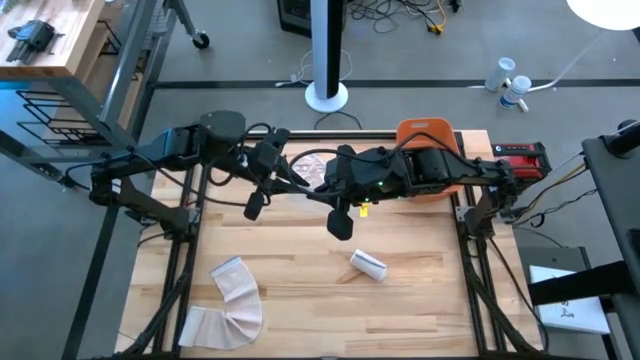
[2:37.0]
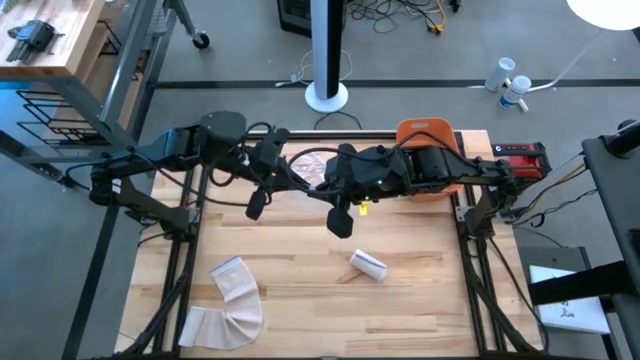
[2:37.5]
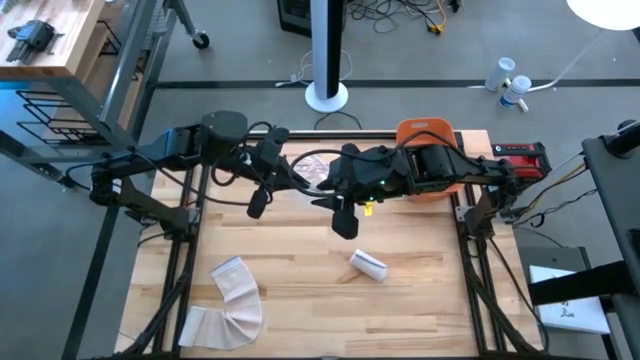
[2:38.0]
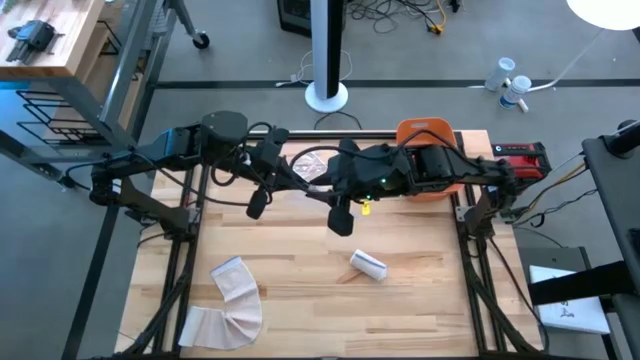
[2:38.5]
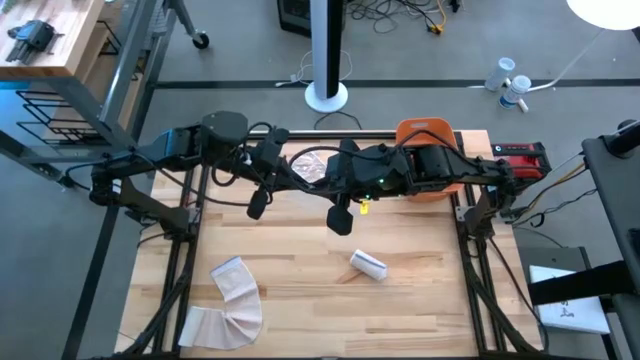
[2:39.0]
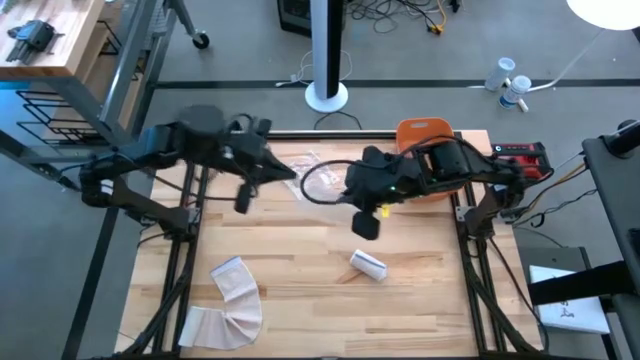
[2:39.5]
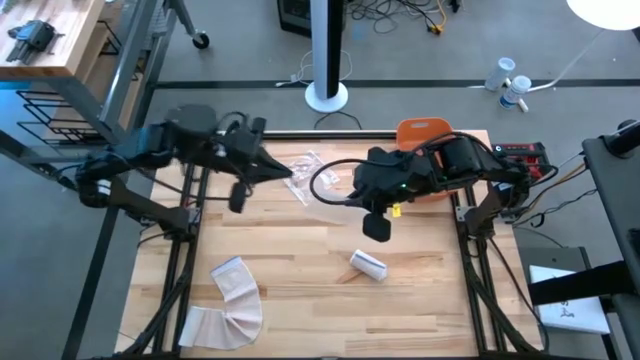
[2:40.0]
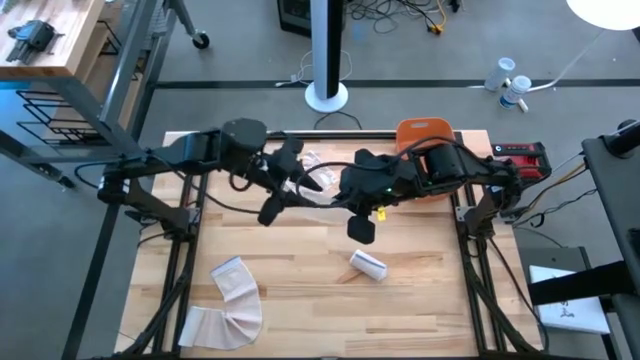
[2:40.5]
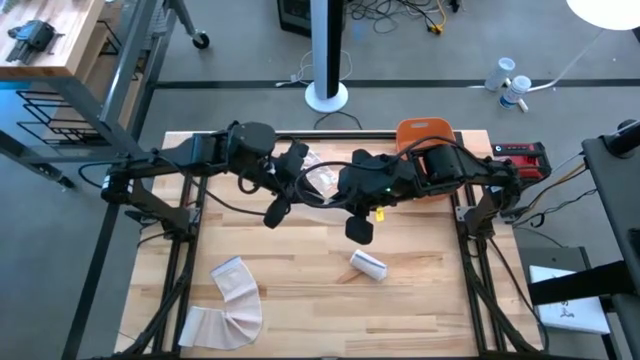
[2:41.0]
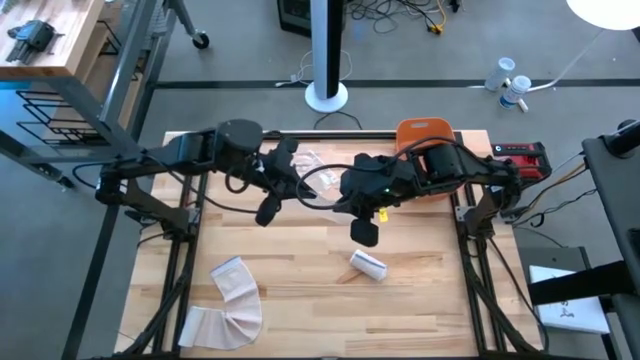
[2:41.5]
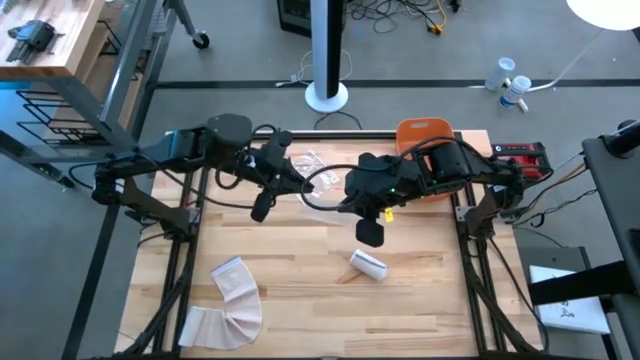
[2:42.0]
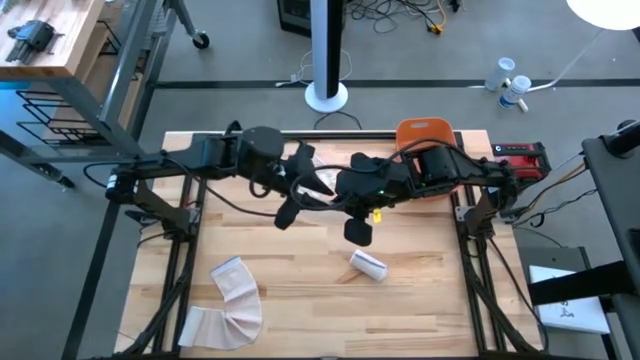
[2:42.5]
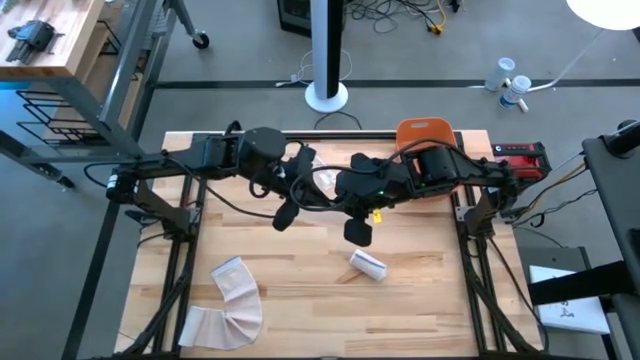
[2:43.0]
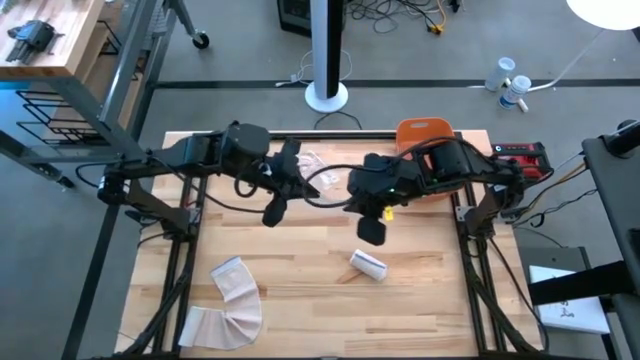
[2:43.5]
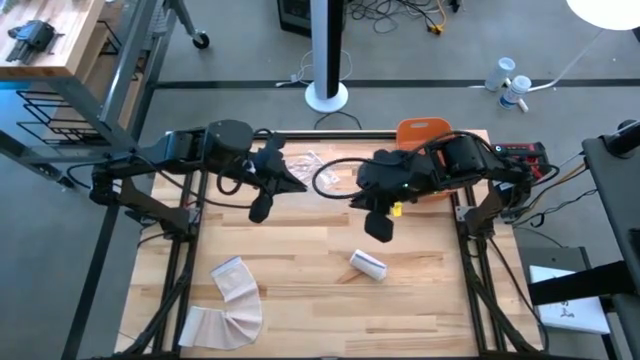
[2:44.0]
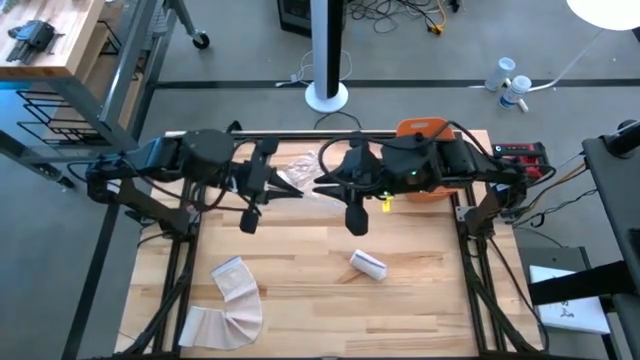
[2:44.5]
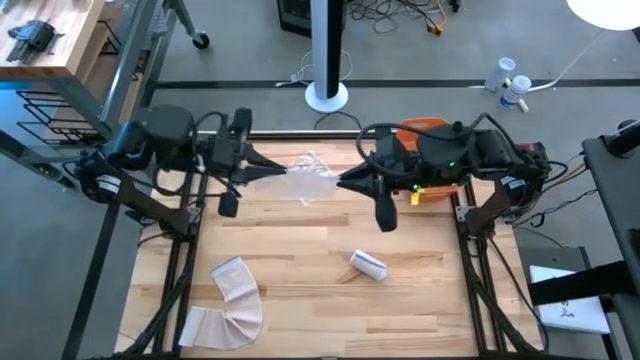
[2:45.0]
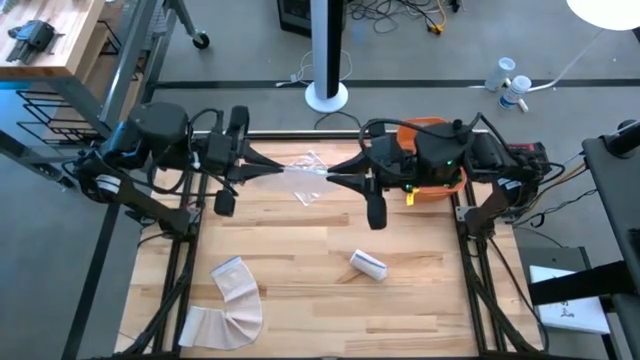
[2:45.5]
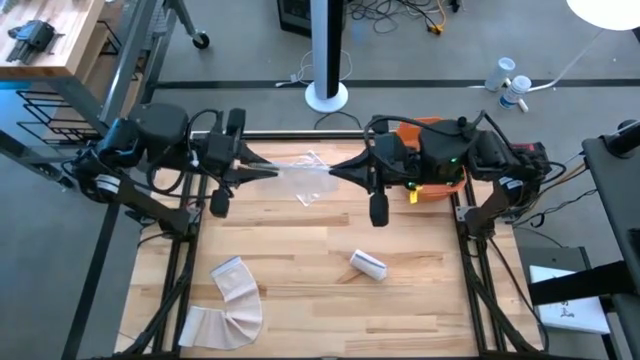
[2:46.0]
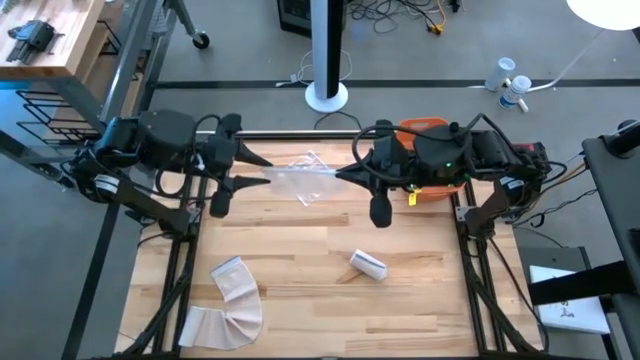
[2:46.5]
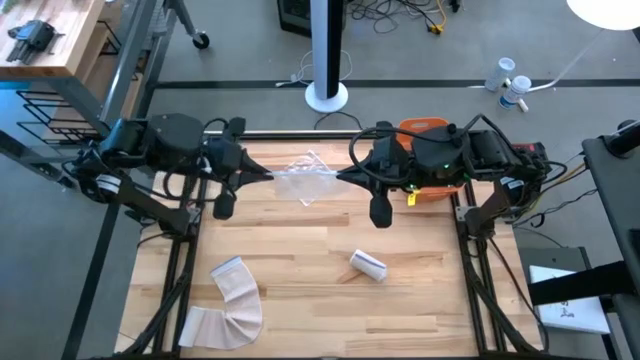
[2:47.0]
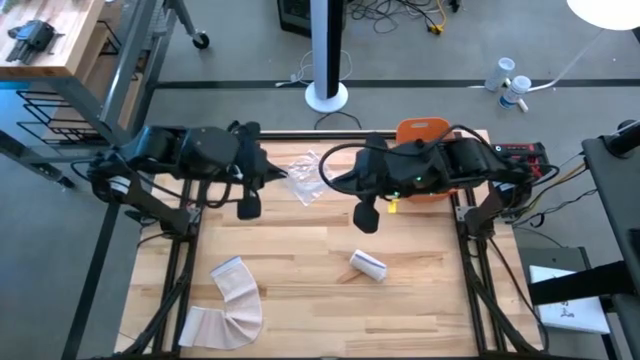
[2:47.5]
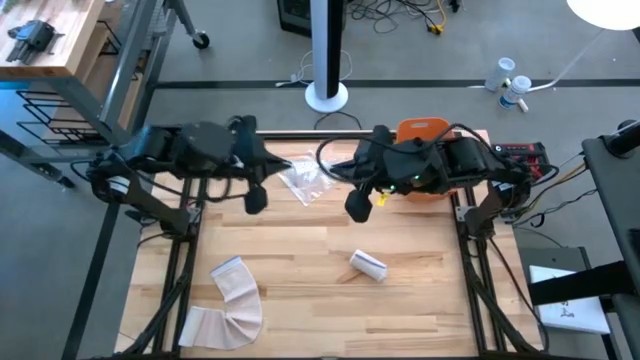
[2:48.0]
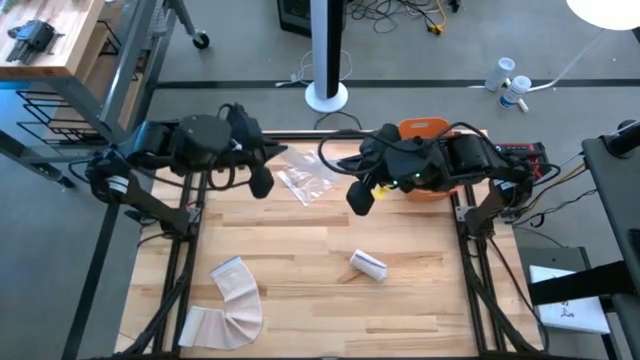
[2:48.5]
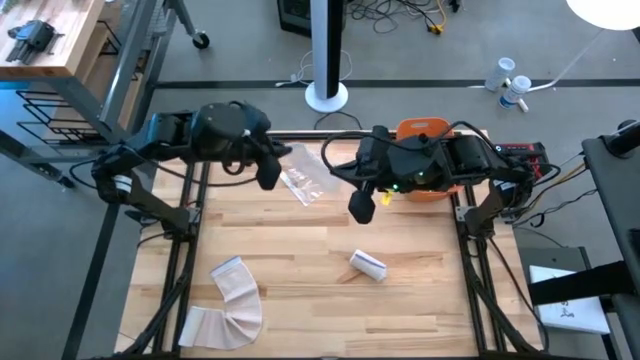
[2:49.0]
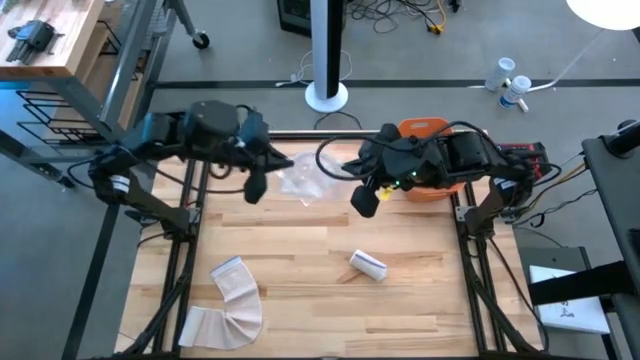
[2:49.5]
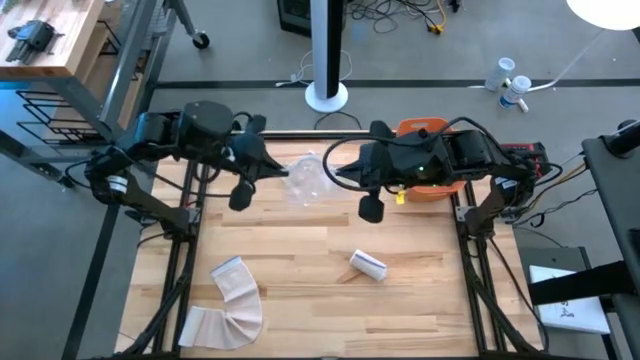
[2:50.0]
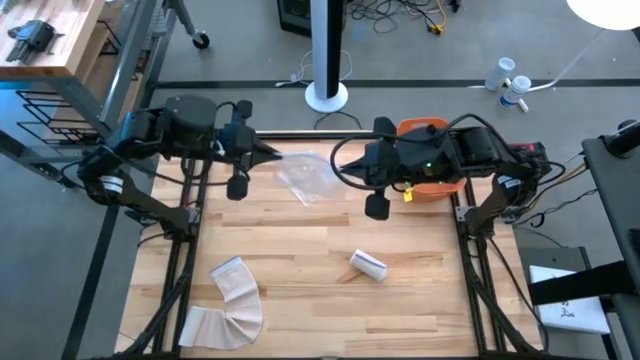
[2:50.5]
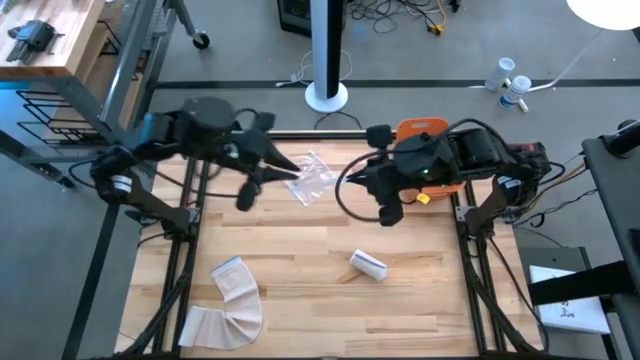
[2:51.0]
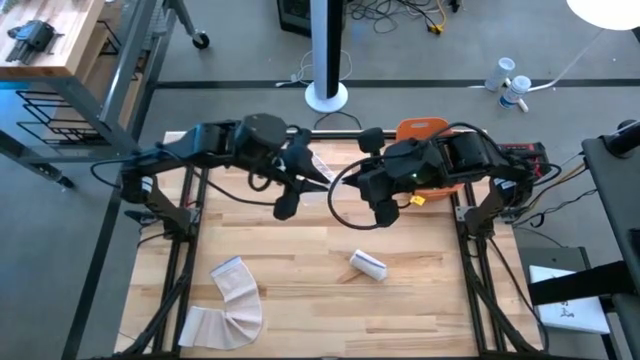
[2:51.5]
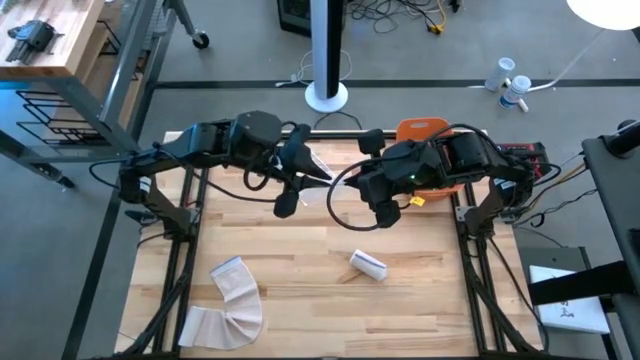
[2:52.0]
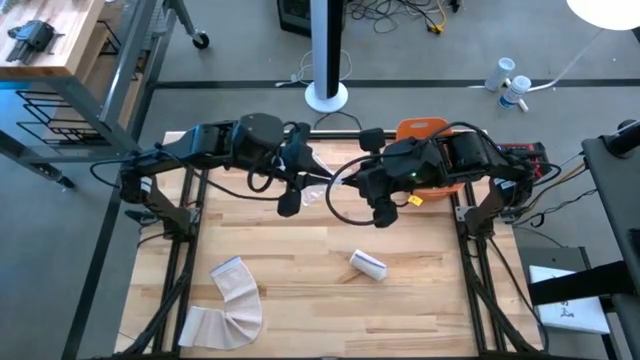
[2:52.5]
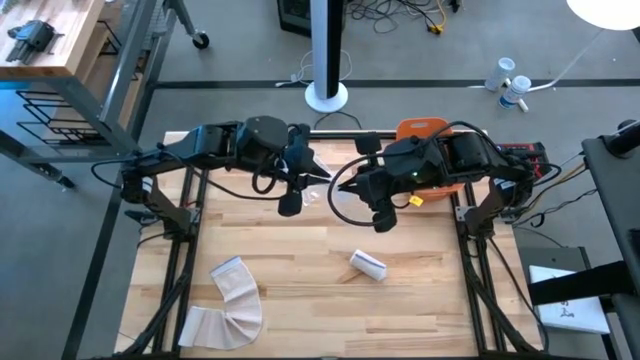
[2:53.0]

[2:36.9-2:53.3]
Task: Roll bandage
Open the transparent zip bag

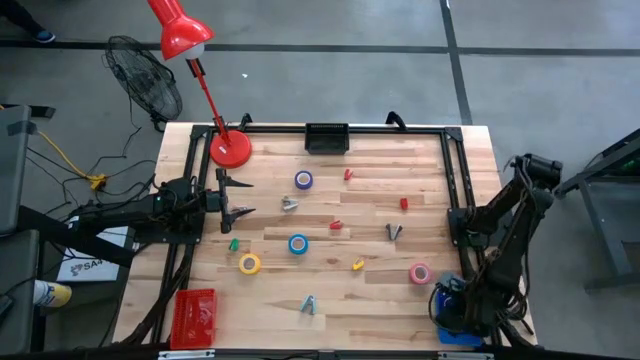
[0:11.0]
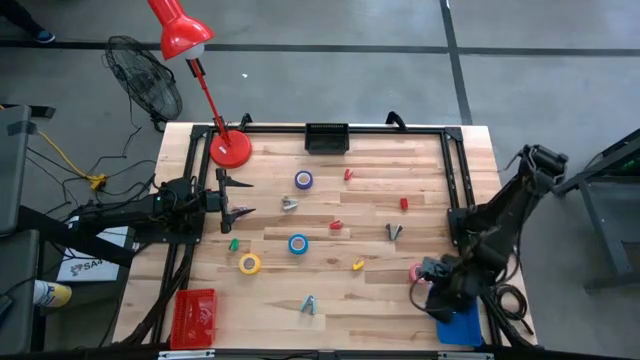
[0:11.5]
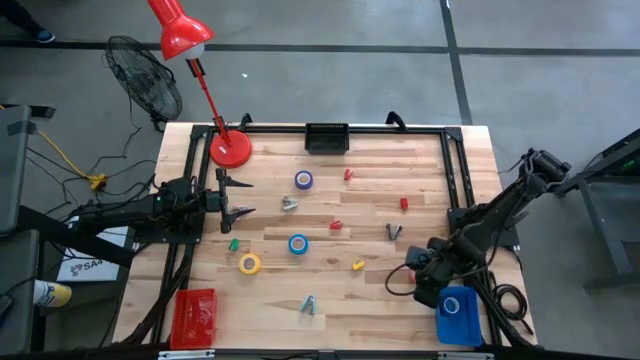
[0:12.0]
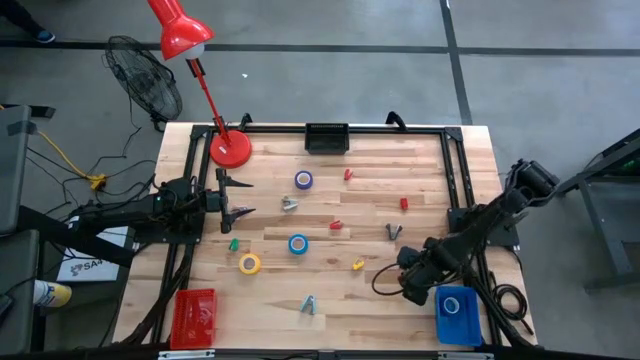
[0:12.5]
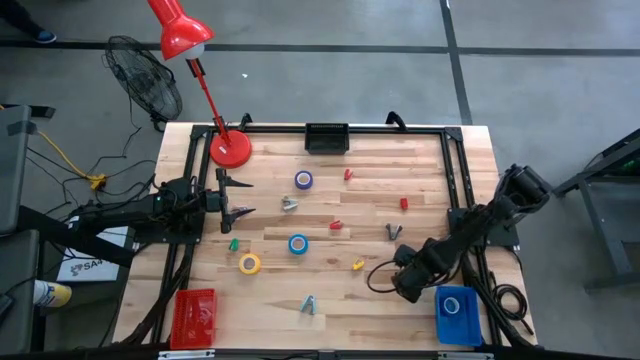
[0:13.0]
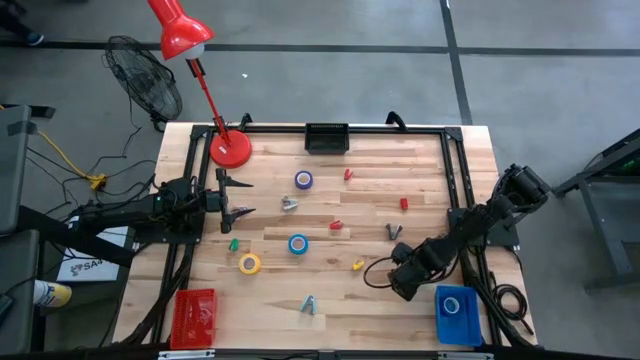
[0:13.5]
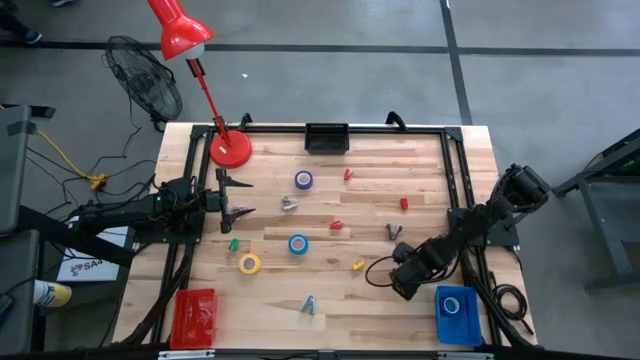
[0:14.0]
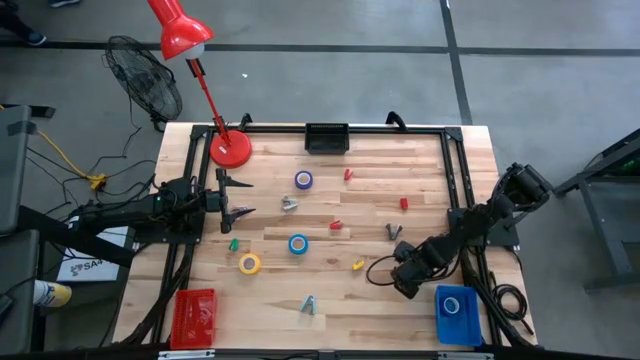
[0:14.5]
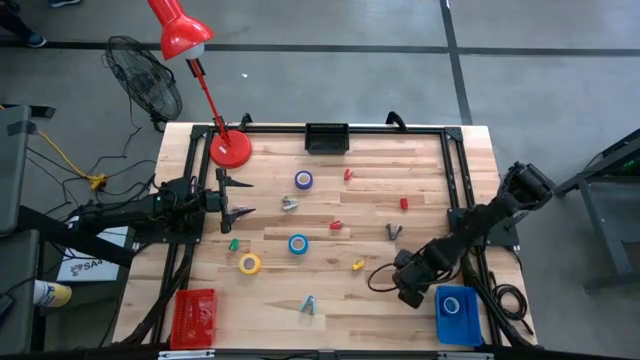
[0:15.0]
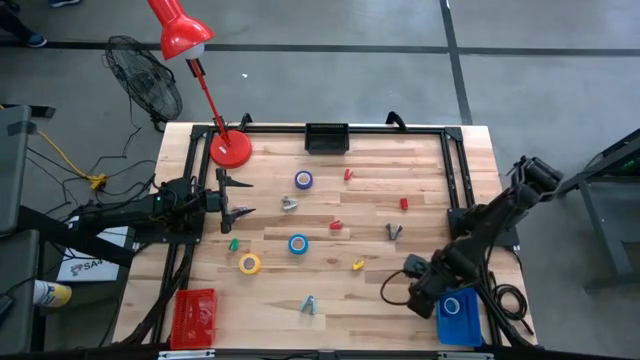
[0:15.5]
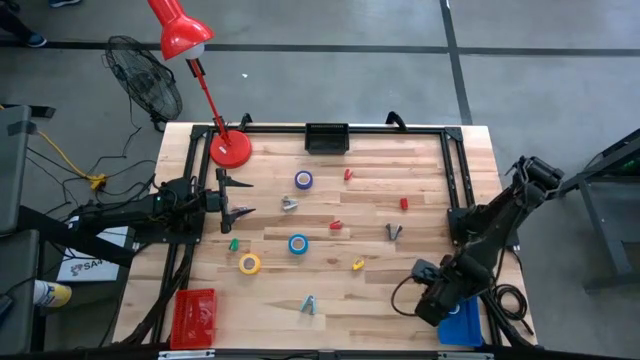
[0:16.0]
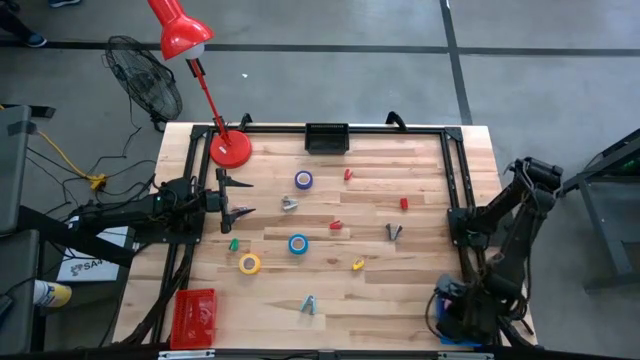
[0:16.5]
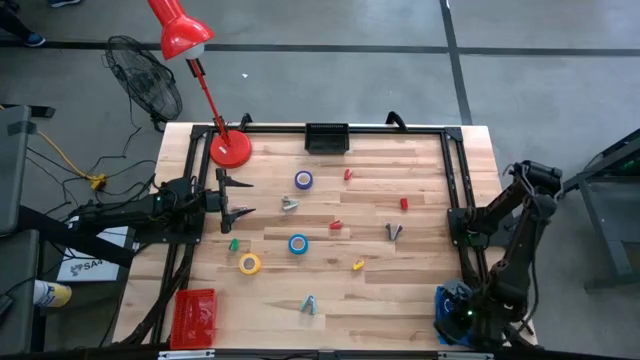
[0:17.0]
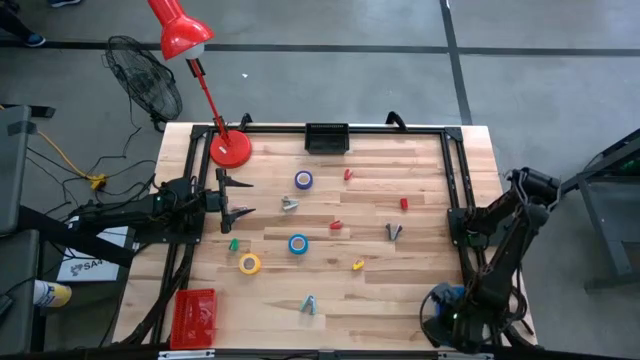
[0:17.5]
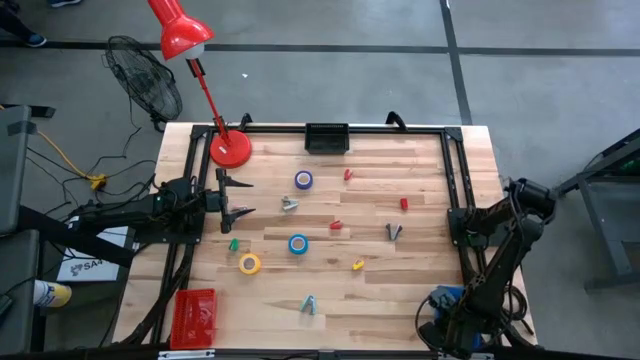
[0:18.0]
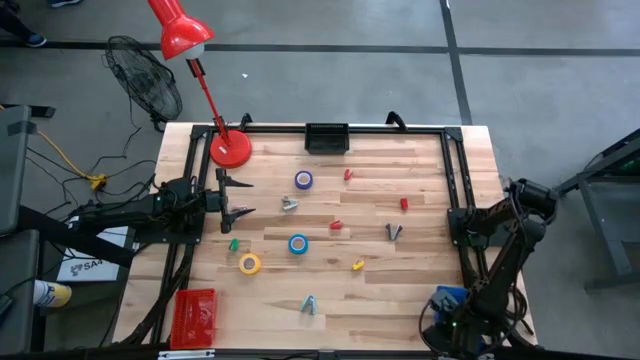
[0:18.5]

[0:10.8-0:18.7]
Task: Pick and place Stapler, Stapler remover, tape
Put the pink tape into the blue basket
